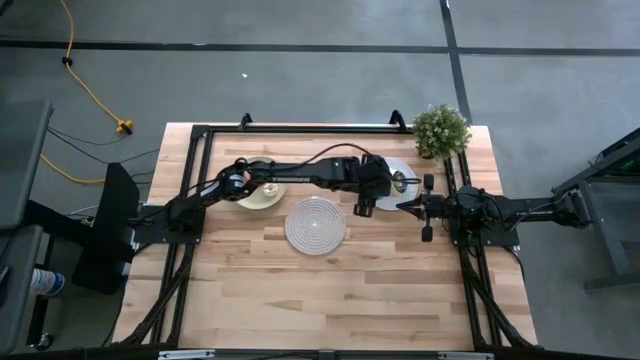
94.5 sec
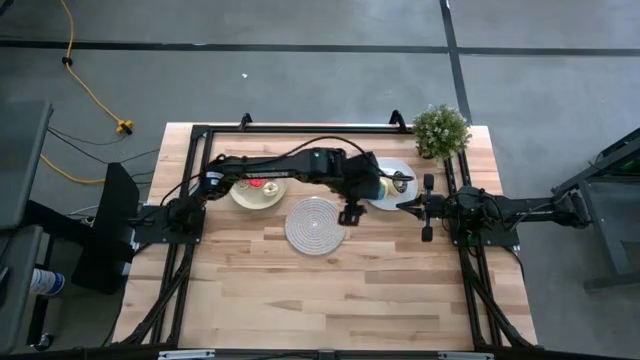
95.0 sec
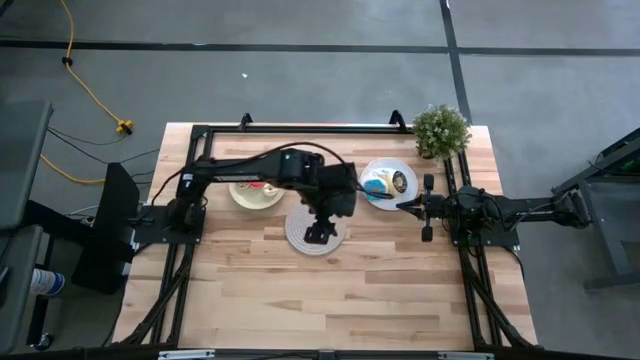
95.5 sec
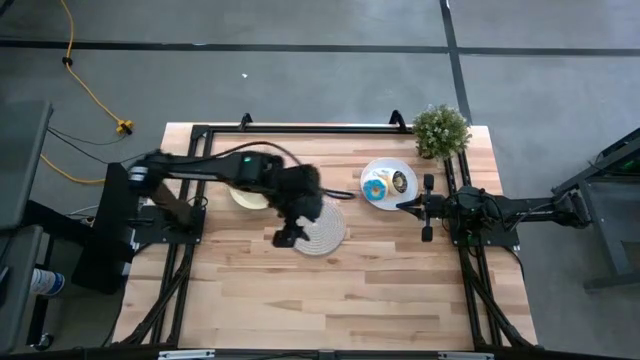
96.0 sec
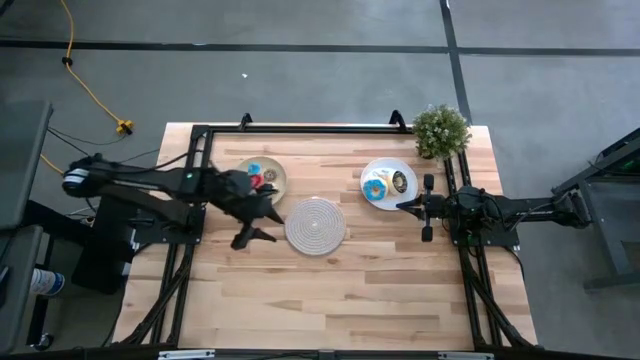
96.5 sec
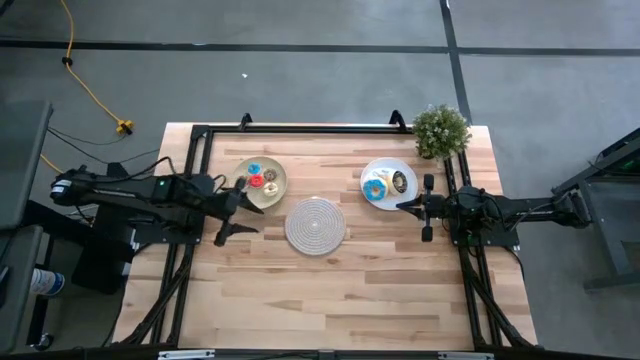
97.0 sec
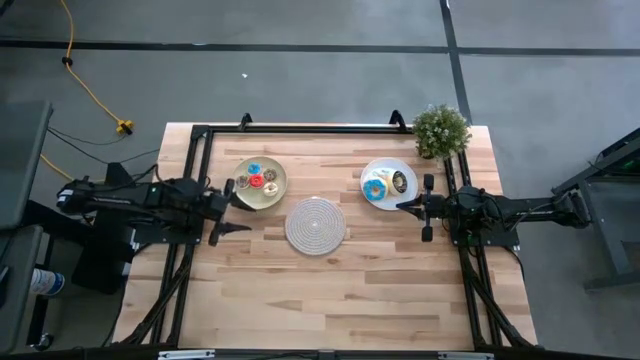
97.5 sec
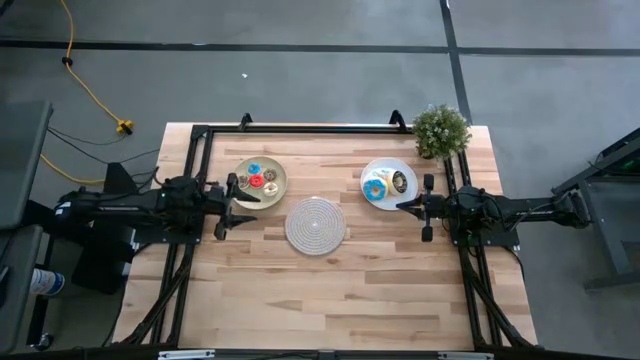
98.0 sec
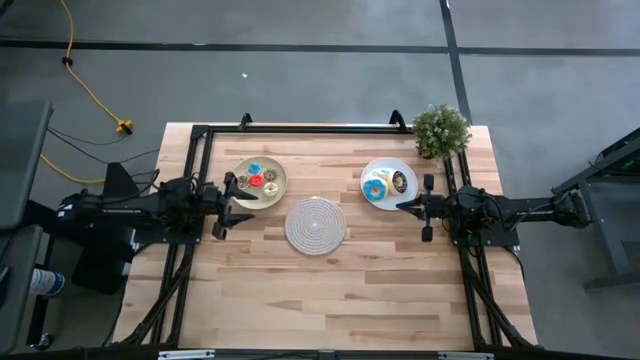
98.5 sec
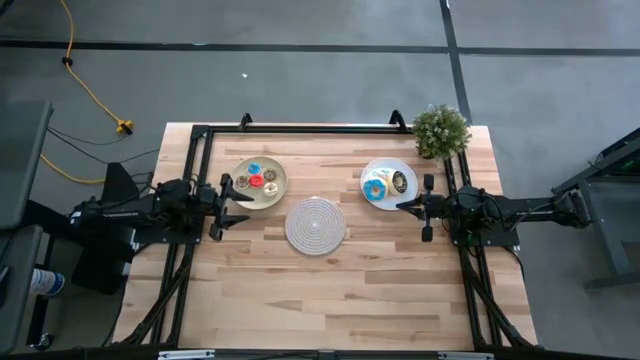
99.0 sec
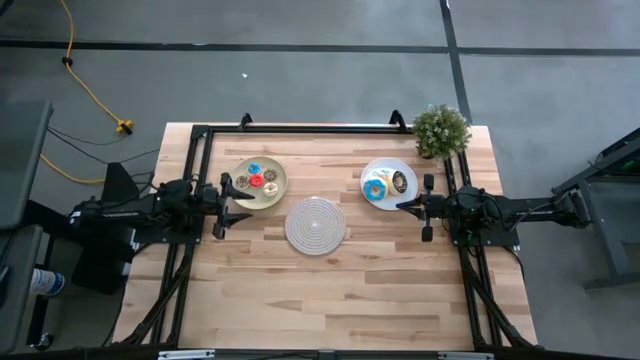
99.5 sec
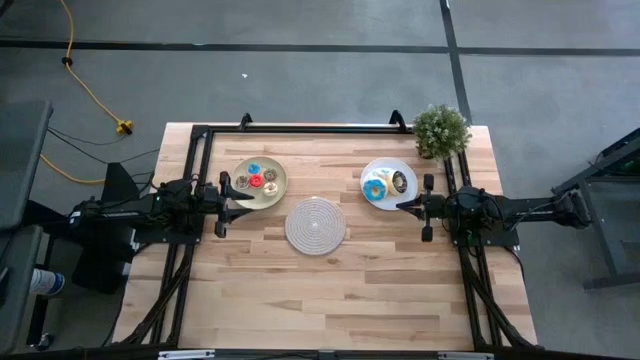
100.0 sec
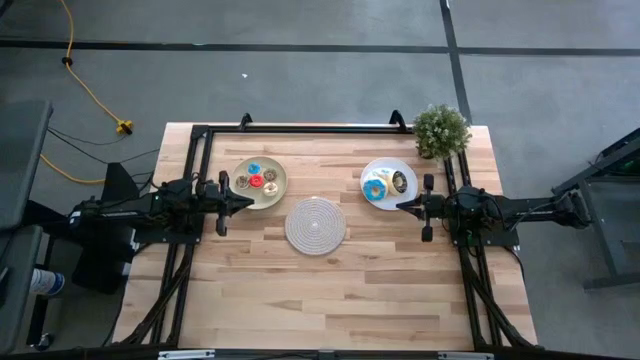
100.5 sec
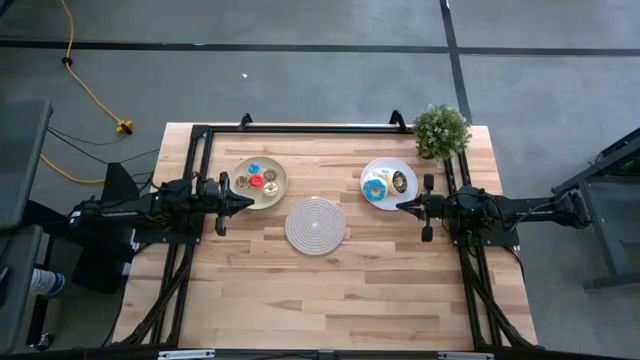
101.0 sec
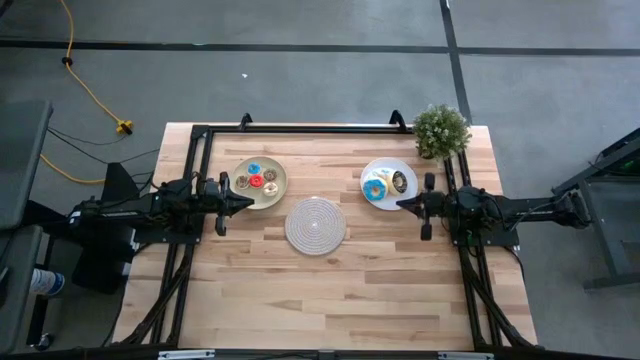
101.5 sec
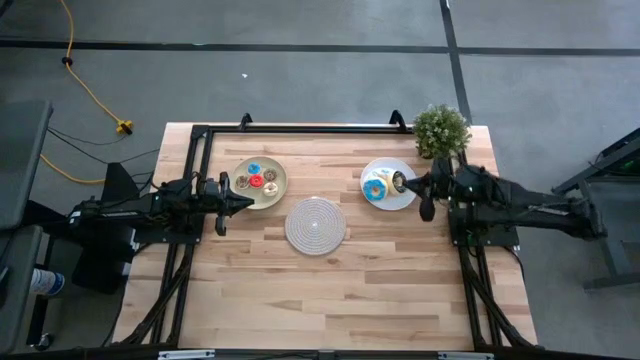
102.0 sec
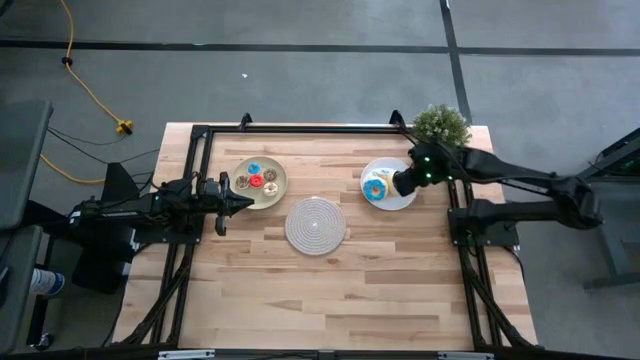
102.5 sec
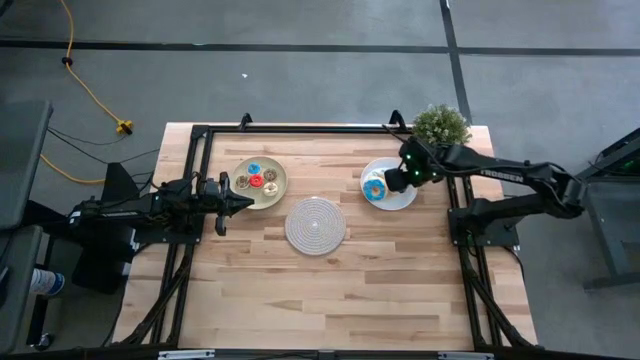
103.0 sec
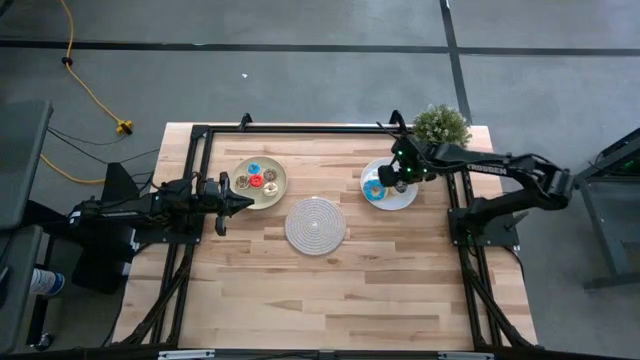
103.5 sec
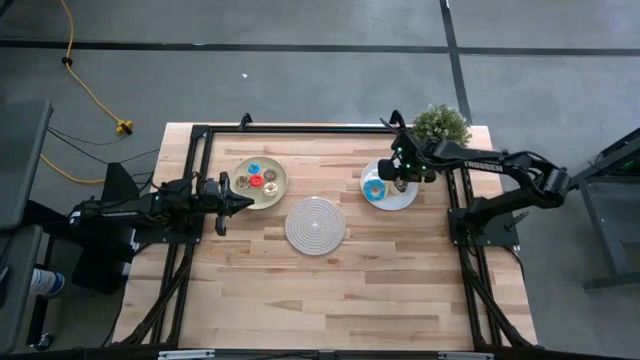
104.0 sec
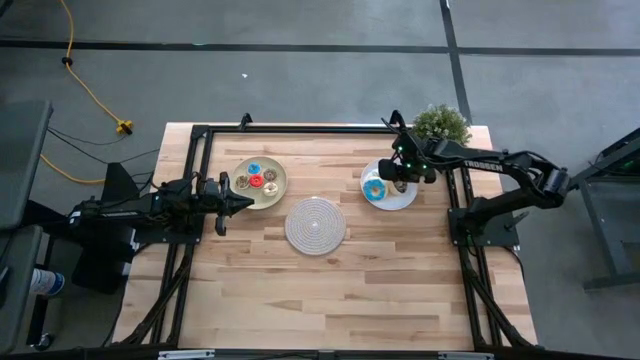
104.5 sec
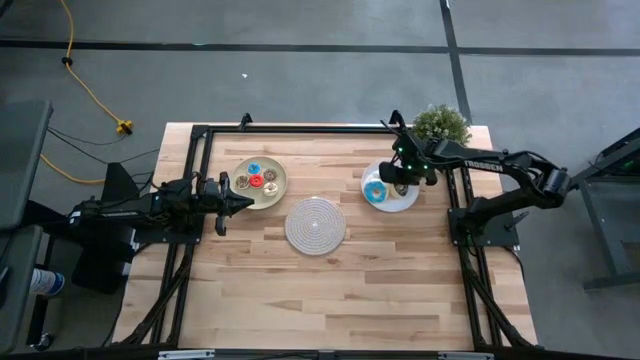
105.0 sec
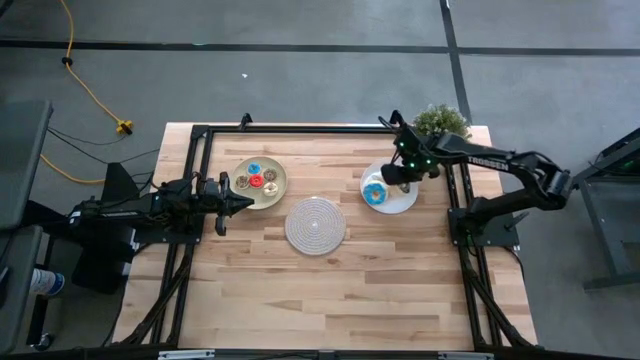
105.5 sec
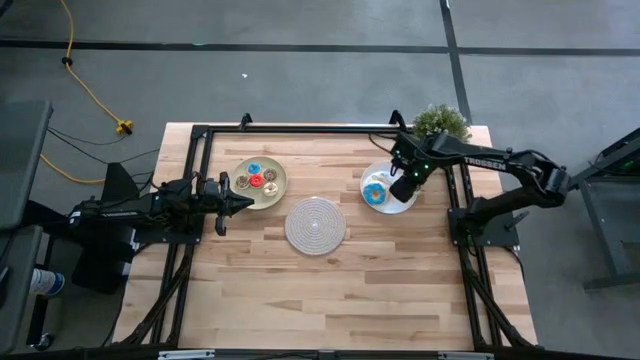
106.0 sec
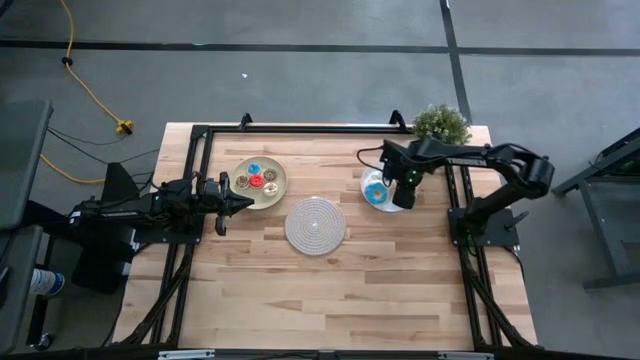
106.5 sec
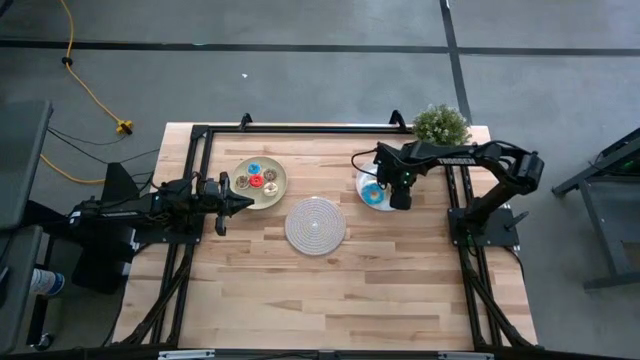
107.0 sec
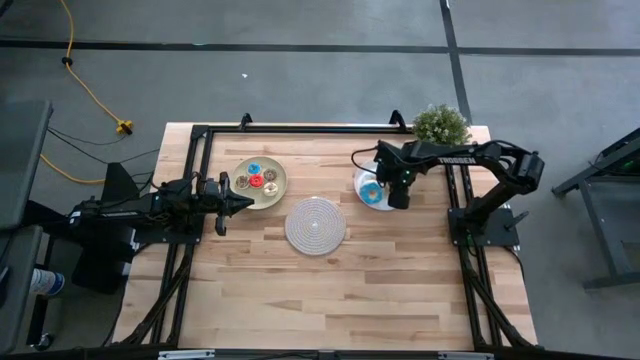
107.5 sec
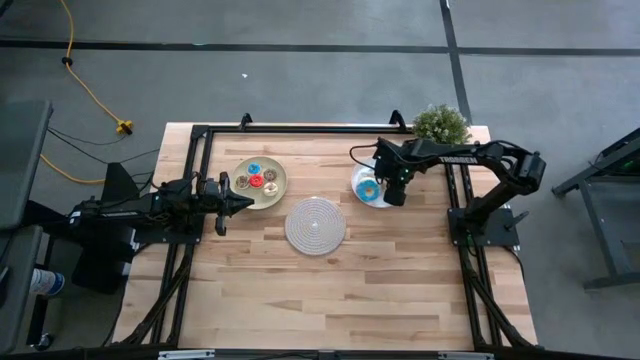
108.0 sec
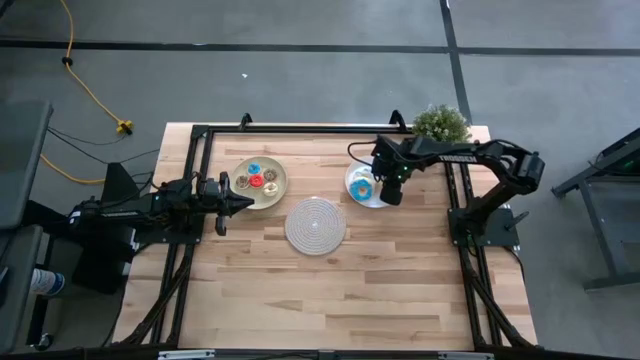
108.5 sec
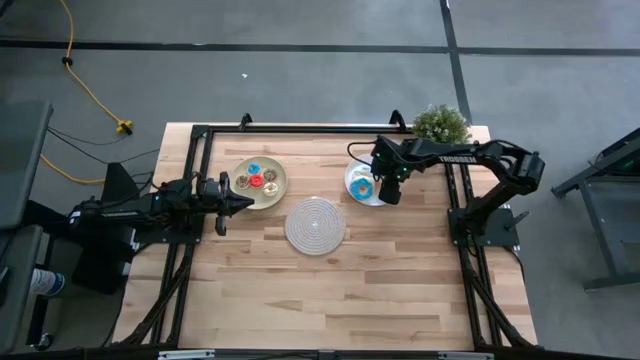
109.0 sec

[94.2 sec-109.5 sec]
Task: Pick & Place donuts
Adjust the large black donut on the white plate

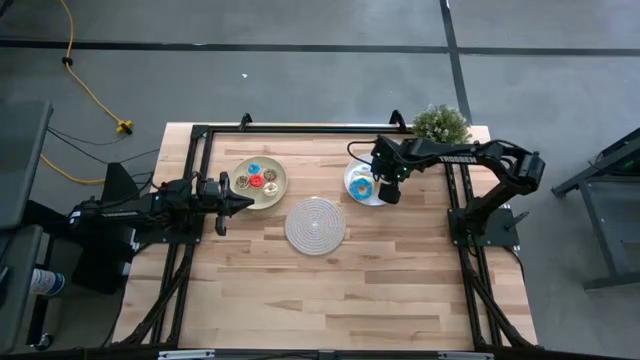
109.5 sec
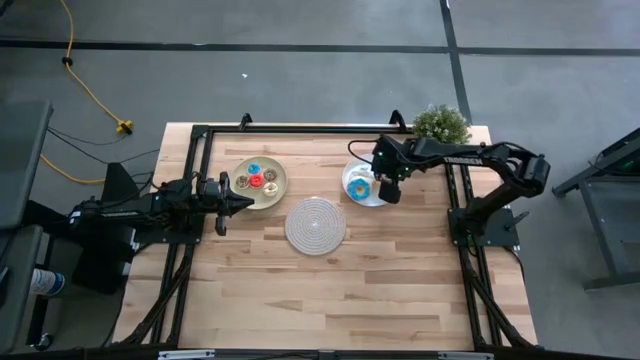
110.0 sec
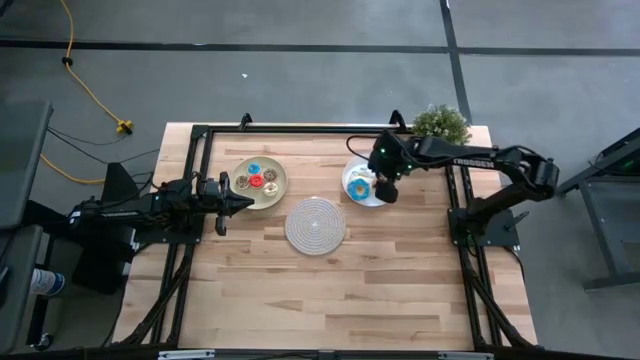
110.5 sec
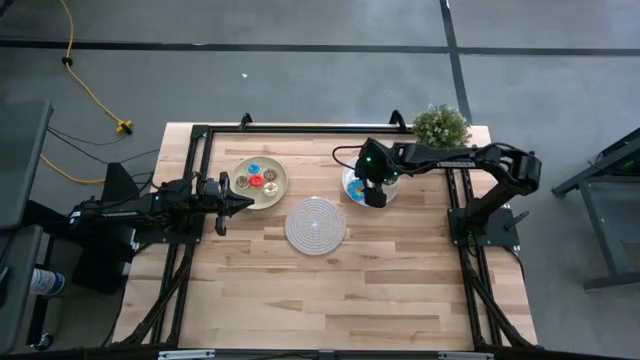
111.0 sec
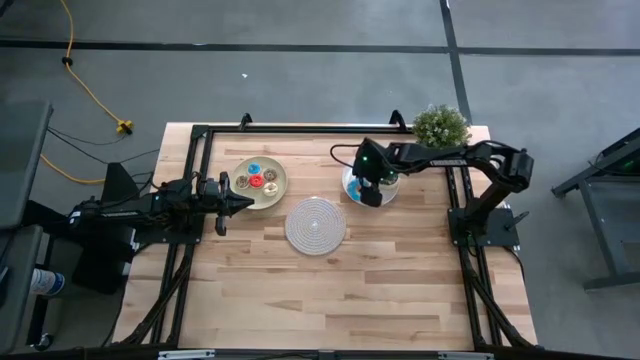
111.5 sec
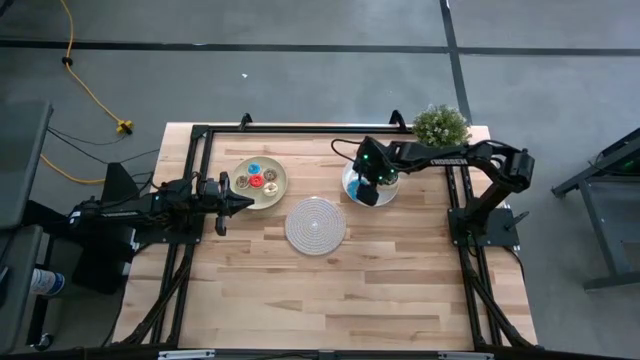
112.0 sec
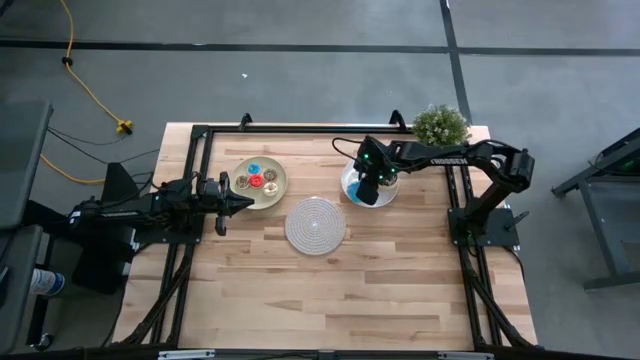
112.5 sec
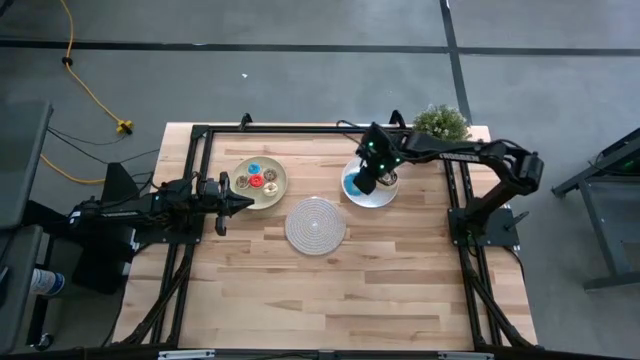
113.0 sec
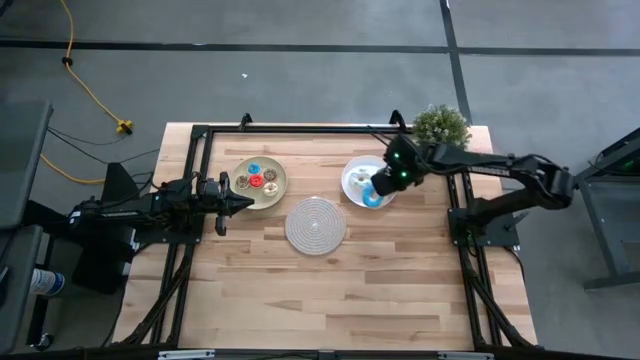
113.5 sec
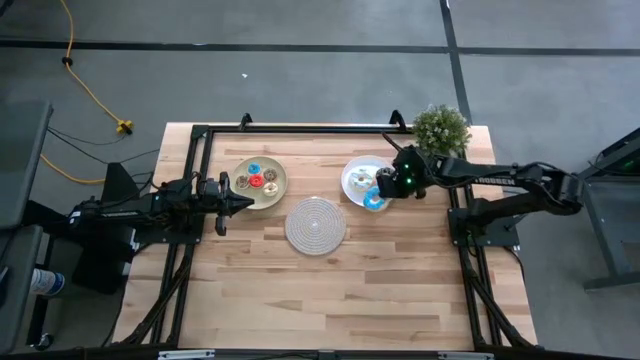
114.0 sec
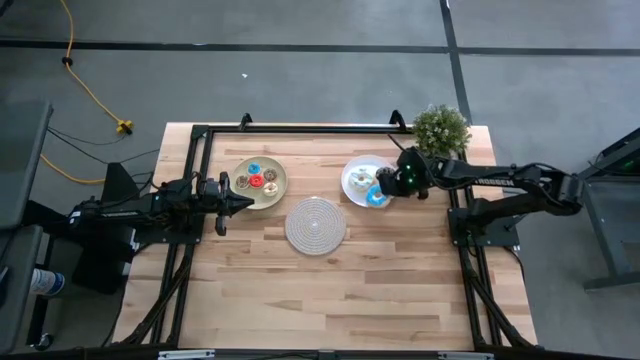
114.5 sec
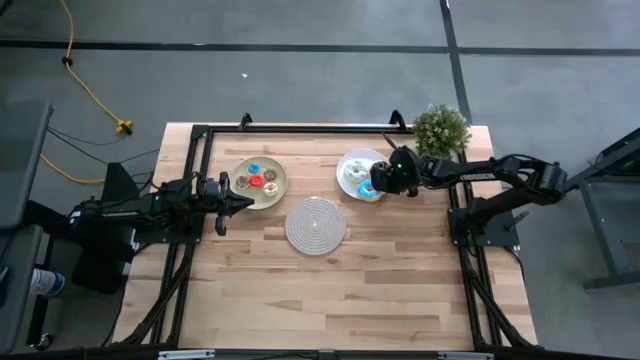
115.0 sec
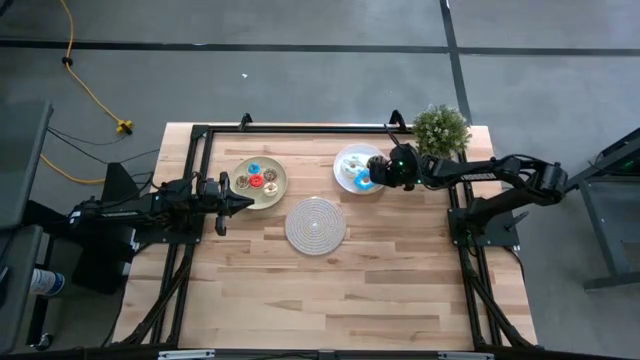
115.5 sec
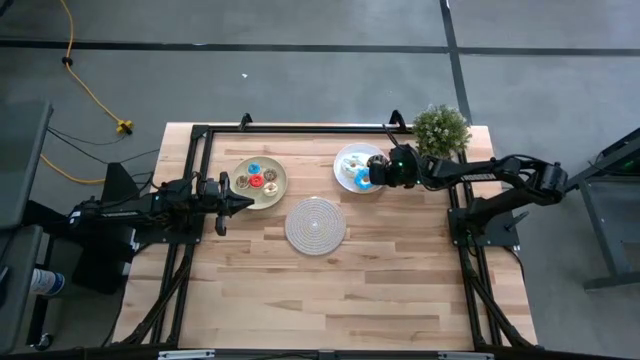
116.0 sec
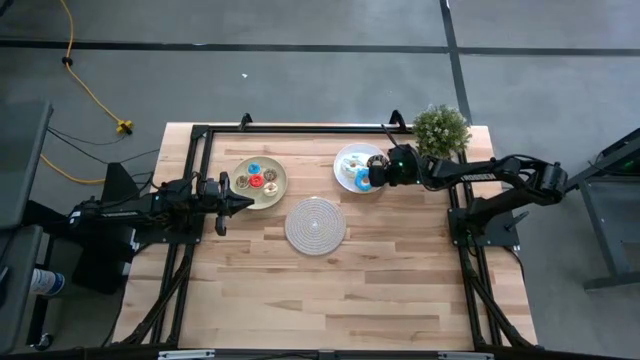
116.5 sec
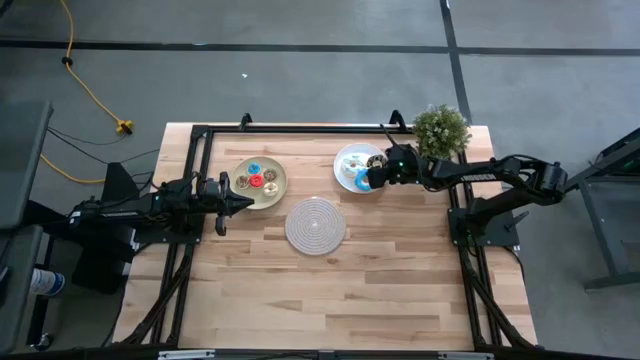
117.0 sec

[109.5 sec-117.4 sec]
Adjust the large blue donut on the white plate
